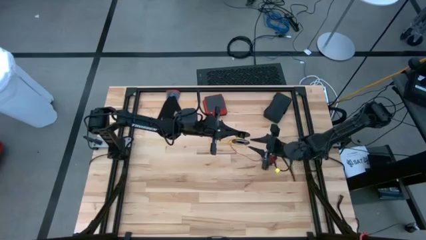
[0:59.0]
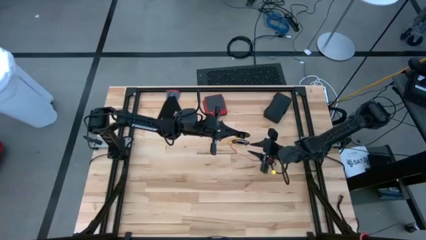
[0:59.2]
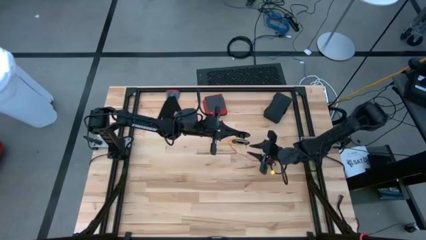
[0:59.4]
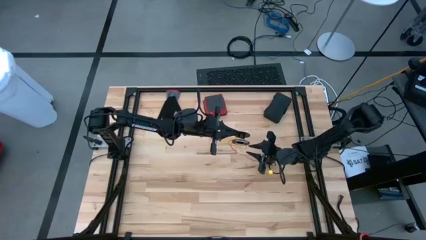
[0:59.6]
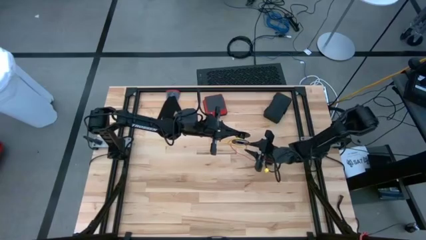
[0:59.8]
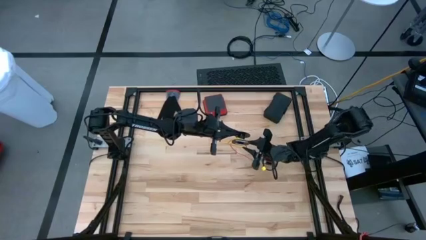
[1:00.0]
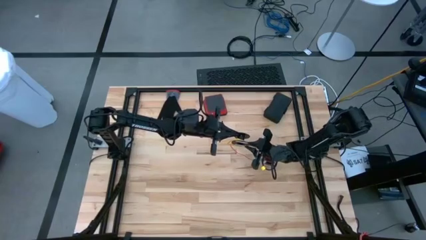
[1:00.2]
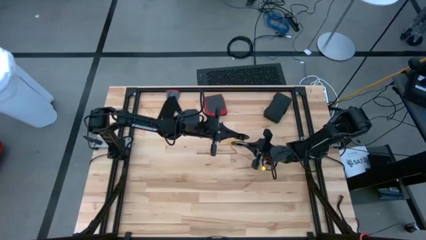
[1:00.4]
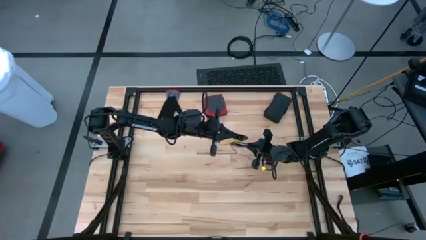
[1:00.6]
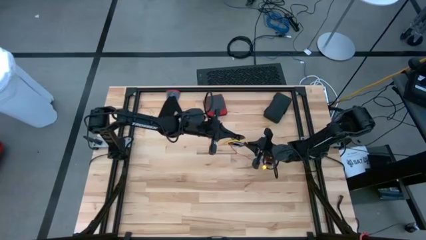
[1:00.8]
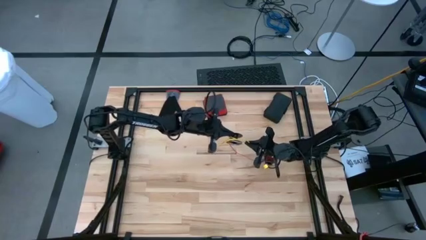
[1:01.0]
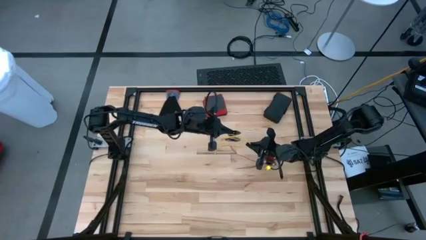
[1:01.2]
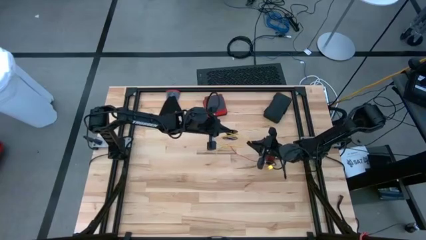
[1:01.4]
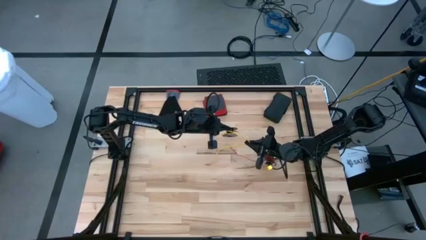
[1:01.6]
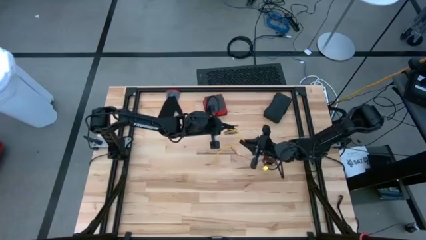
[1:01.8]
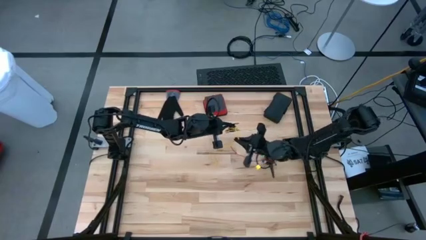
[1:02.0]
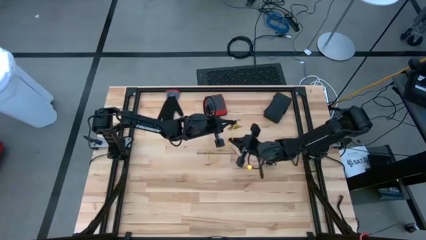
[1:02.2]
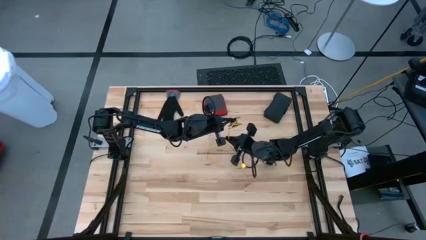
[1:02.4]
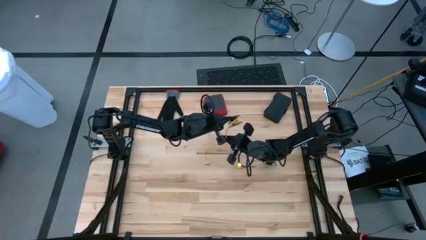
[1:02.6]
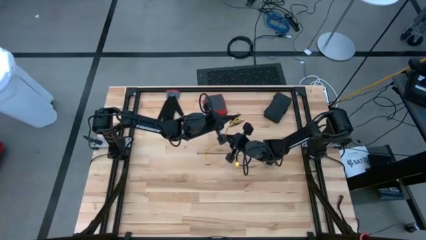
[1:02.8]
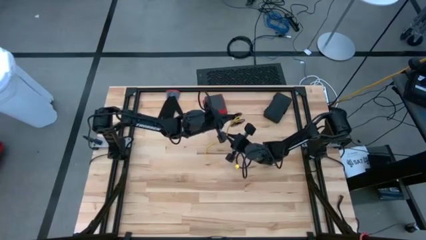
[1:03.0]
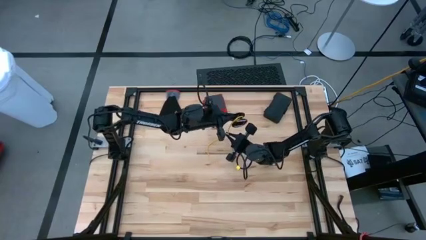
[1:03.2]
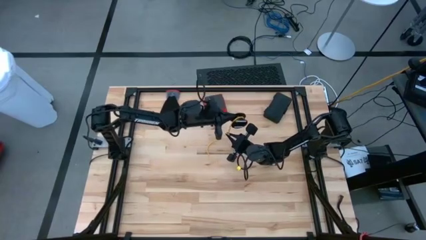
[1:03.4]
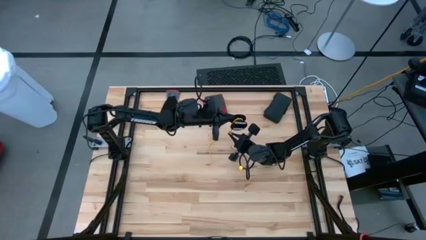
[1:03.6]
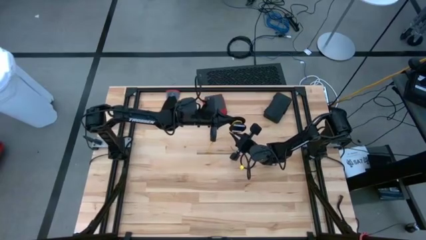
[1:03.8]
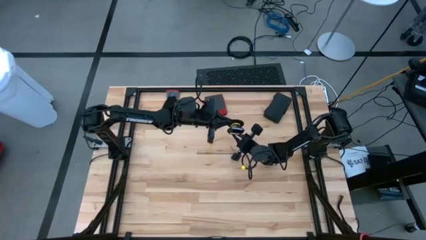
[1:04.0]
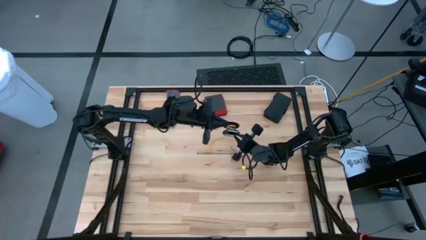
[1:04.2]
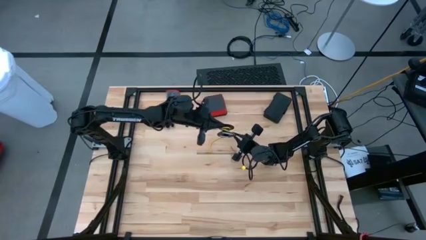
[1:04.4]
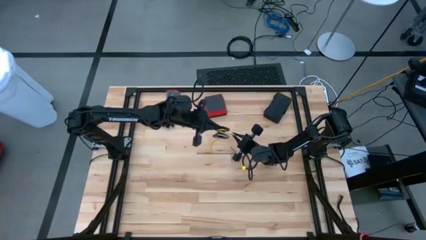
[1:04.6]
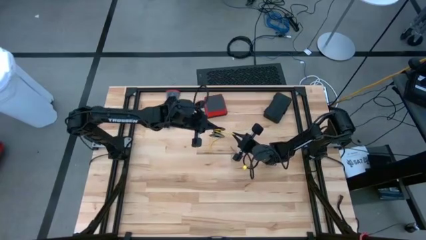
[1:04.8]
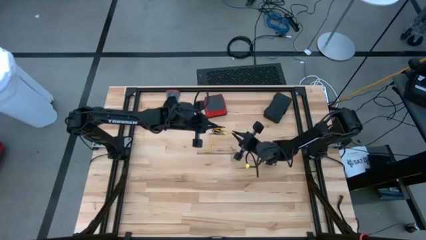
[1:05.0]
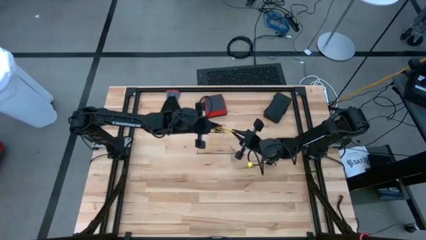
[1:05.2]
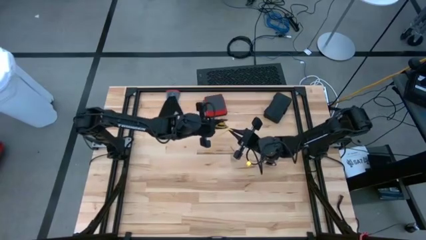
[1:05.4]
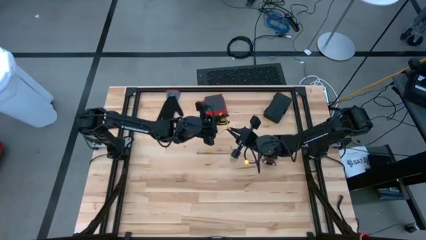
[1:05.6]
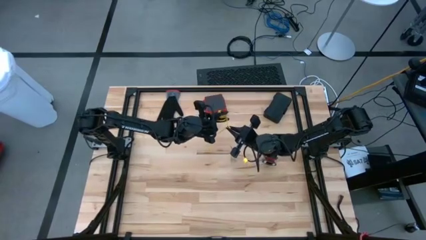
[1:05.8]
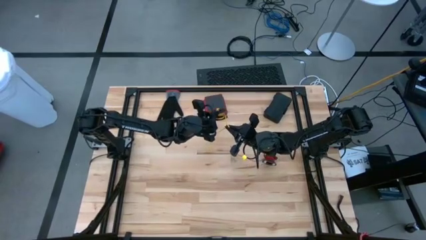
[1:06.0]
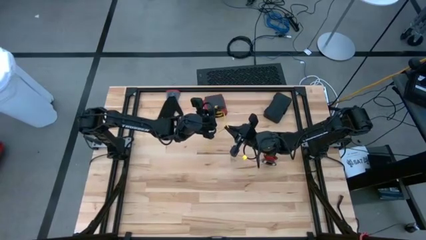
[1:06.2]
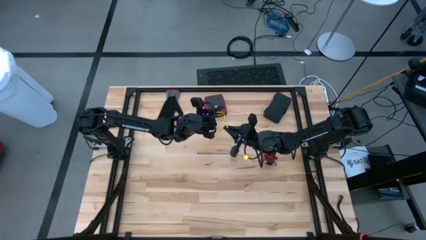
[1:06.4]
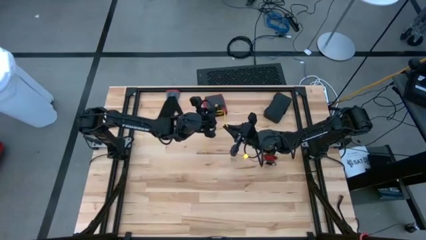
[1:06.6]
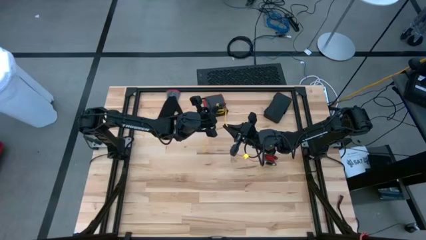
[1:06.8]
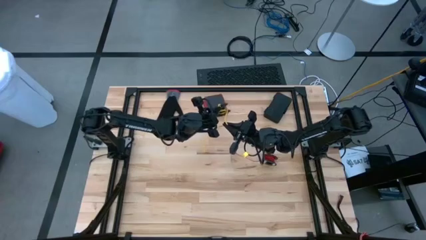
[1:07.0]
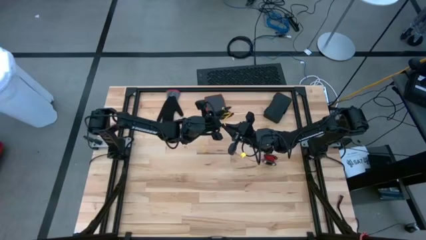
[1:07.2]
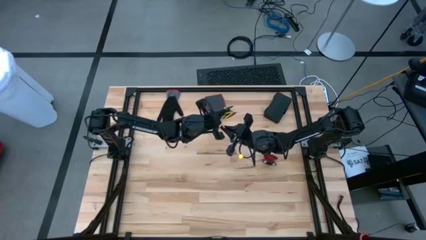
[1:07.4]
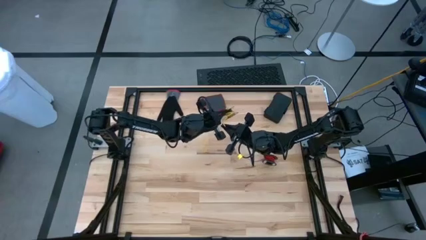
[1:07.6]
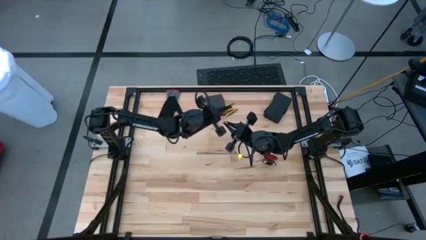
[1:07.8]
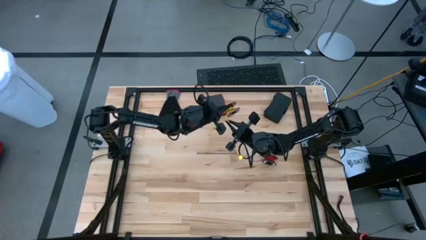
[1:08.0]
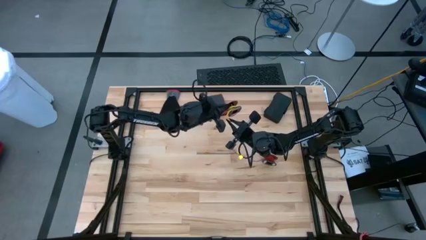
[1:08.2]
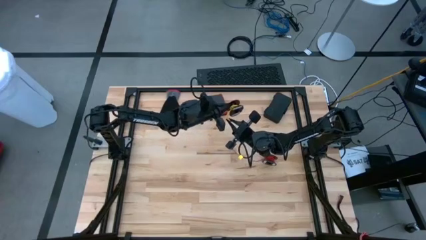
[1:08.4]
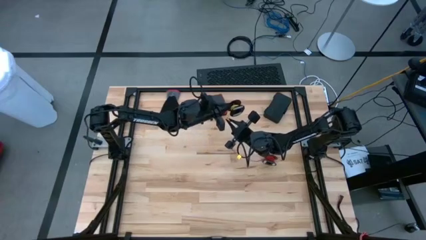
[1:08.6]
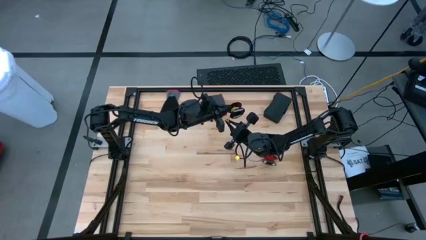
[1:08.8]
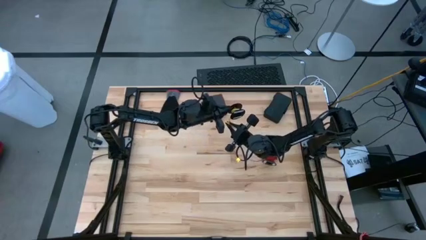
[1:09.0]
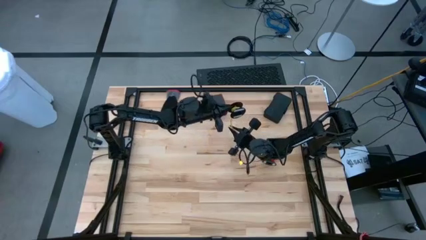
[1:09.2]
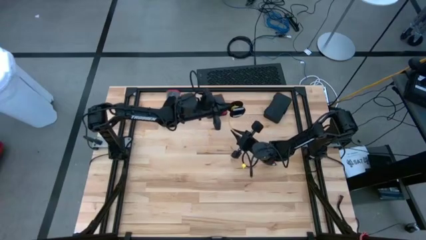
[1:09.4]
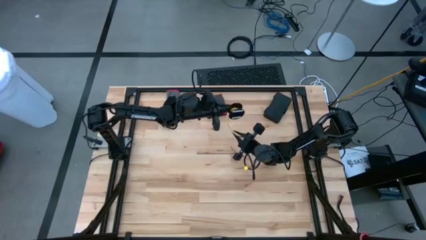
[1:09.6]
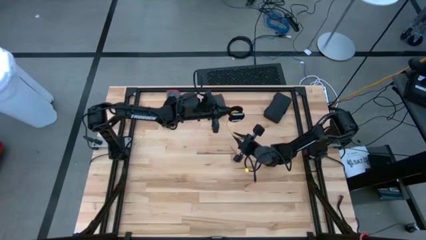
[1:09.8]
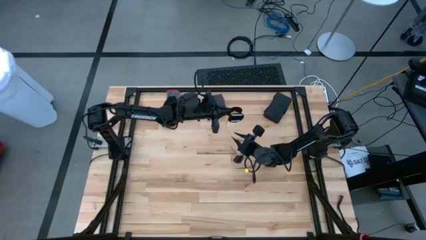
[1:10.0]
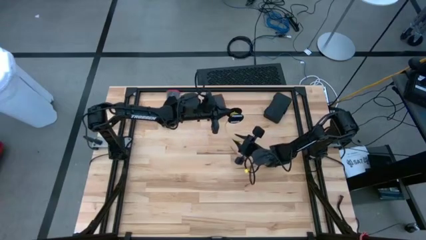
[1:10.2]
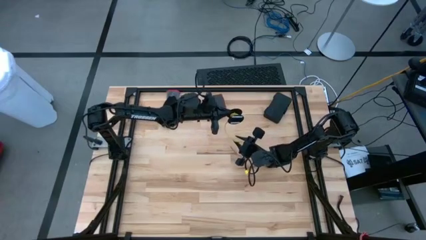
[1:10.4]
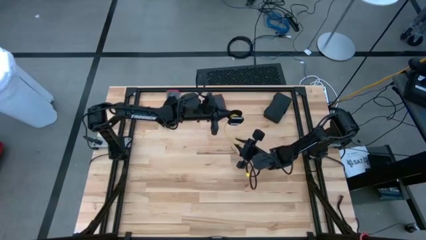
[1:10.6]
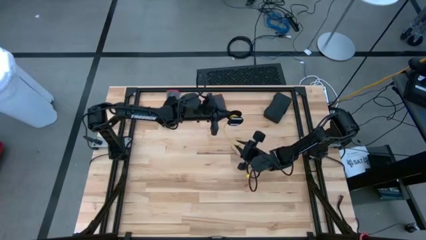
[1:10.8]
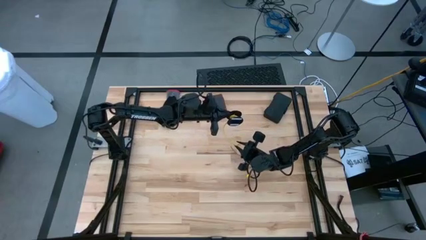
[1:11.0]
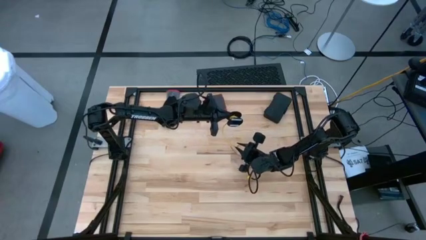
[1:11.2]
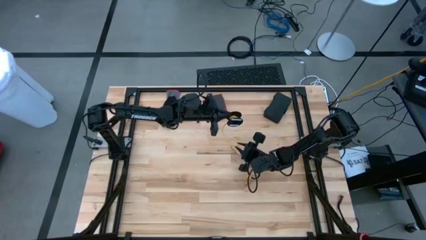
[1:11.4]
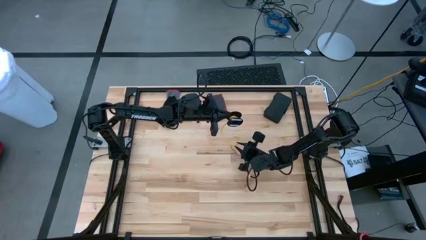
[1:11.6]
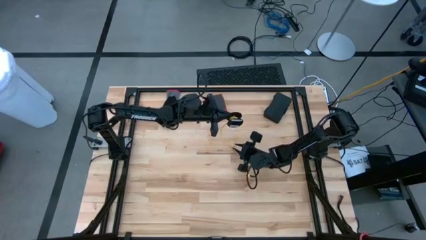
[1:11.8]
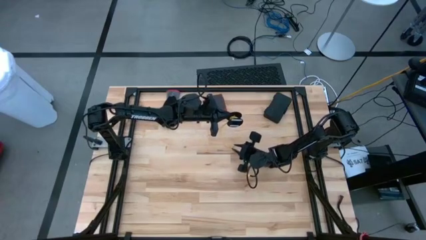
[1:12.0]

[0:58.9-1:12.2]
Task: Coil cords
Coil the yellow wire onto the spool

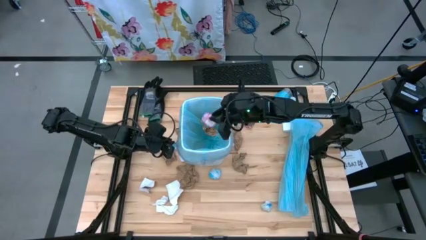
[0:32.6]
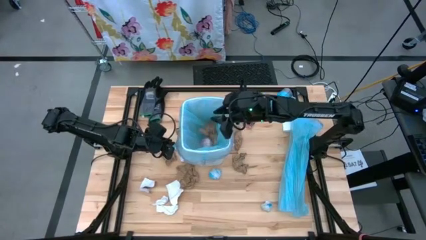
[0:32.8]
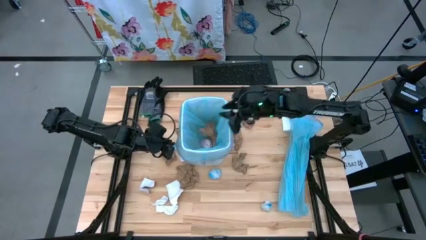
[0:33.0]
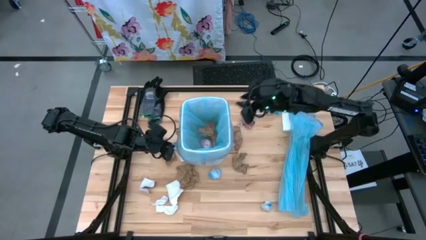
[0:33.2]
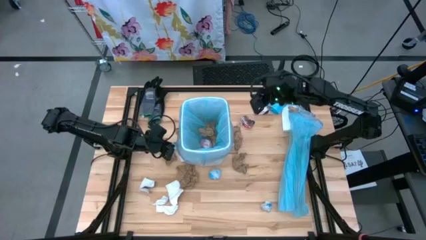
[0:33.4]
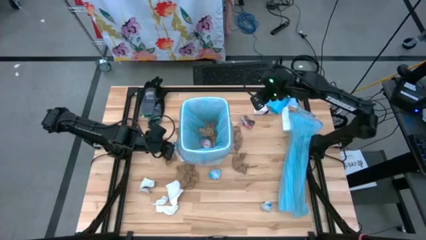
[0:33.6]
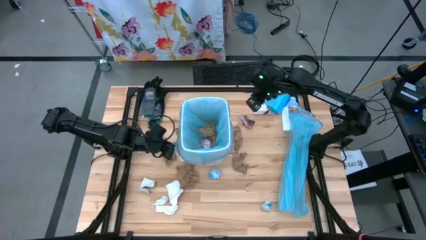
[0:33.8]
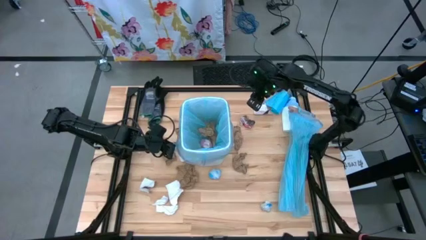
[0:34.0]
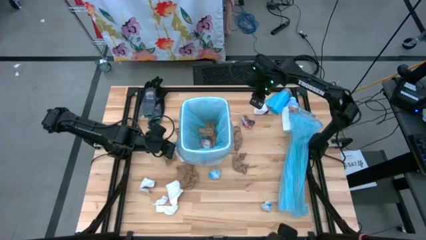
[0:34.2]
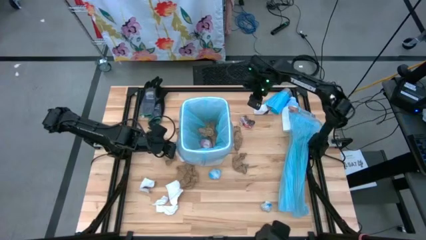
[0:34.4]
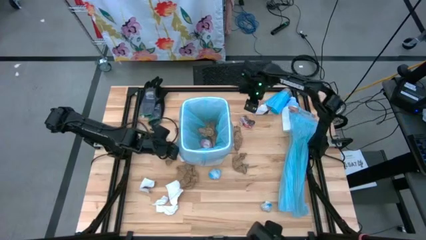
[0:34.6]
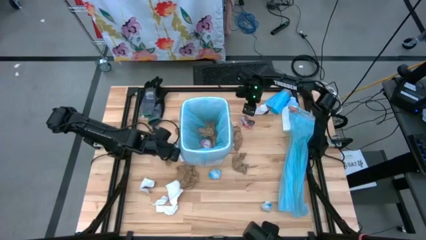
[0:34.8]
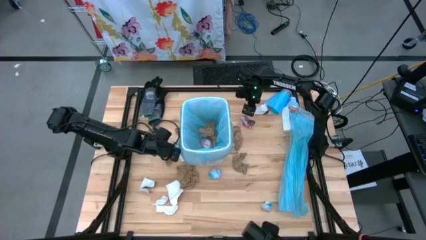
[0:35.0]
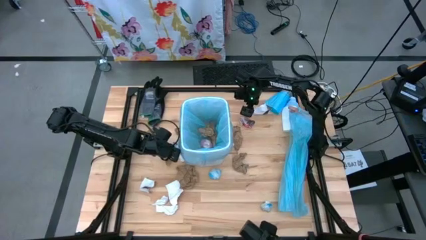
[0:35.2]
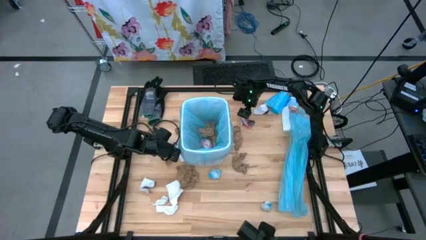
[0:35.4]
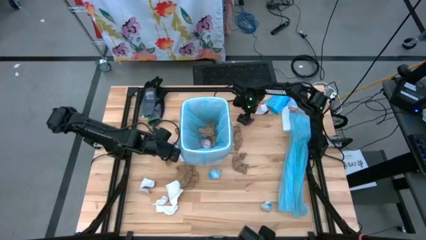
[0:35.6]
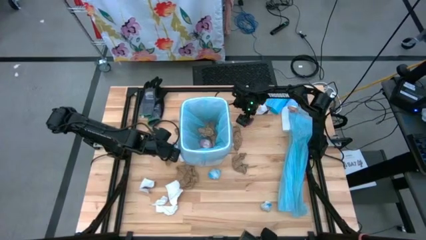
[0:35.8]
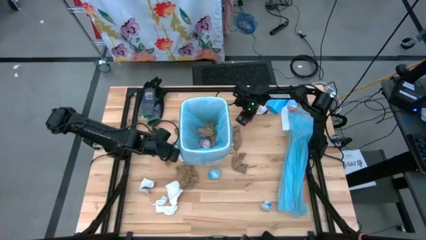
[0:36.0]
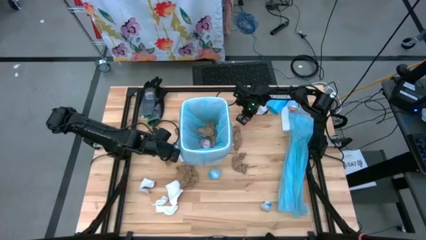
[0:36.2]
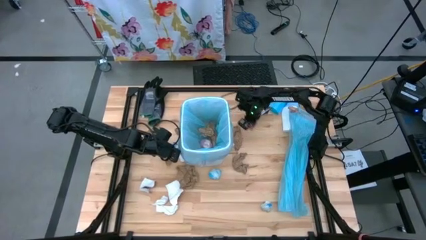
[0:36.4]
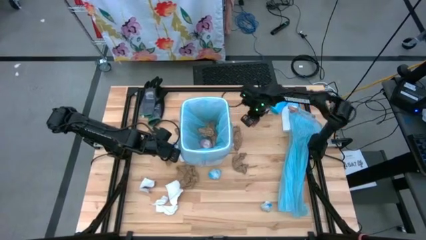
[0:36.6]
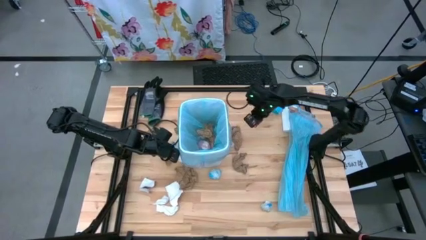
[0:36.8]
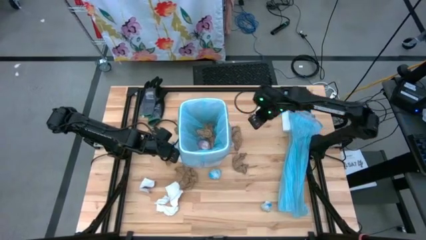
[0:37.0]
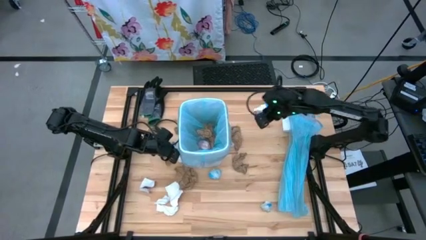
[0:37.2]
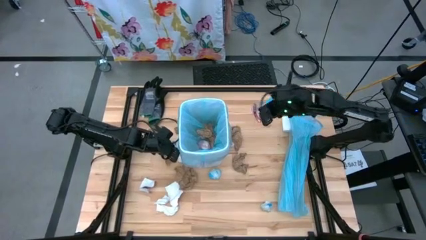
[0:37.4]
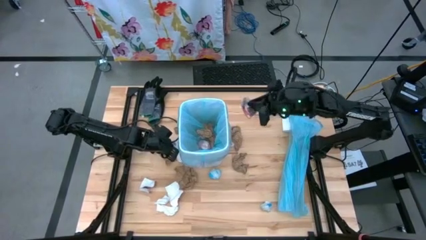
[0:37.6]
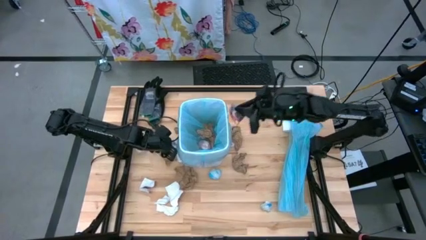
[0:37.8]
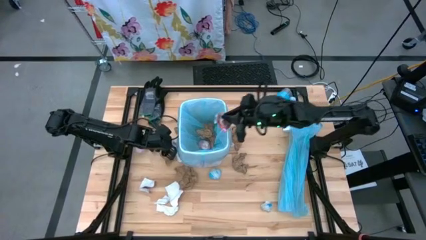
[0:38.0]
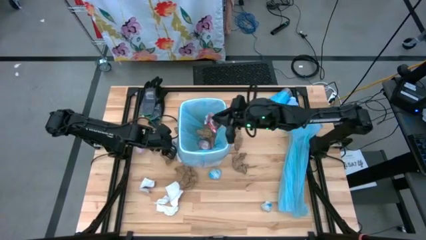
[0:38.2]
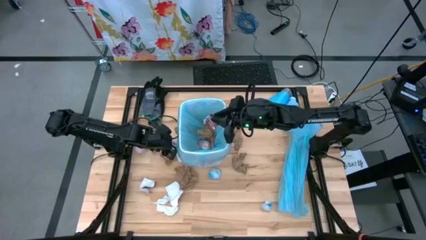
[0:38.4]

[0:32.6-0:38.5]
Task: place trash/remove bag and relplace
Put the white and red paper into the trash bin
